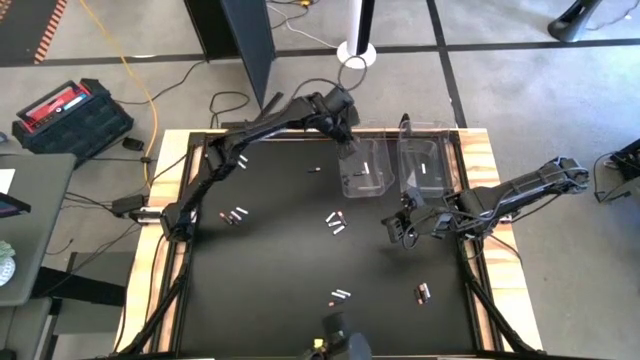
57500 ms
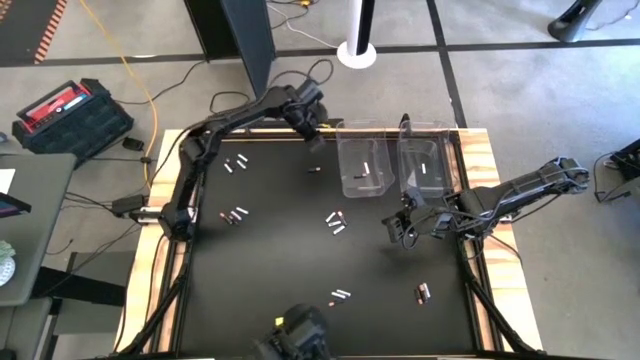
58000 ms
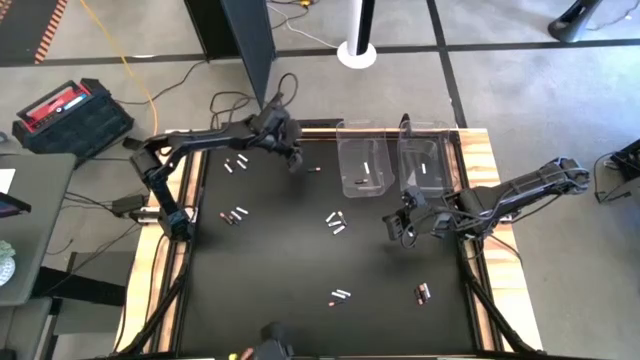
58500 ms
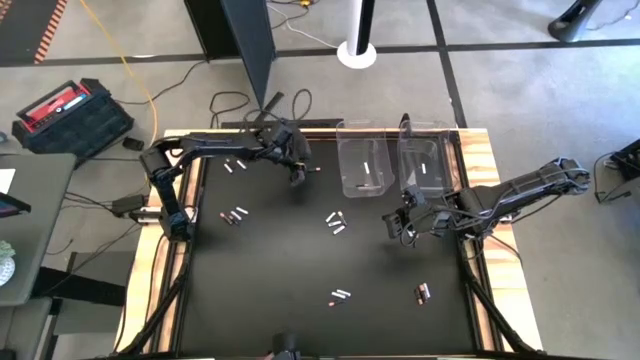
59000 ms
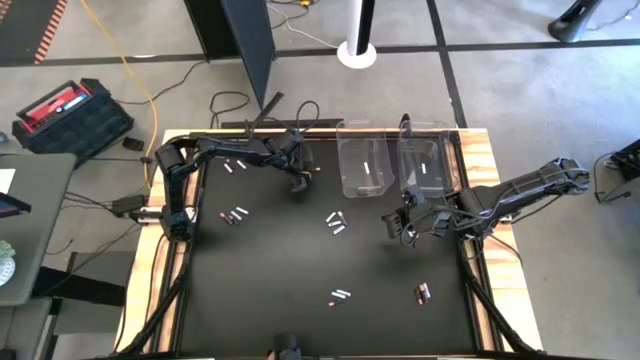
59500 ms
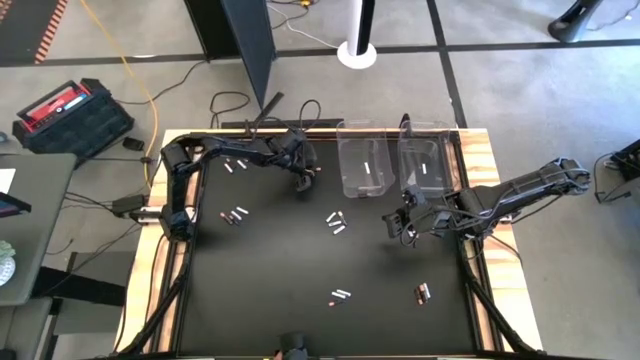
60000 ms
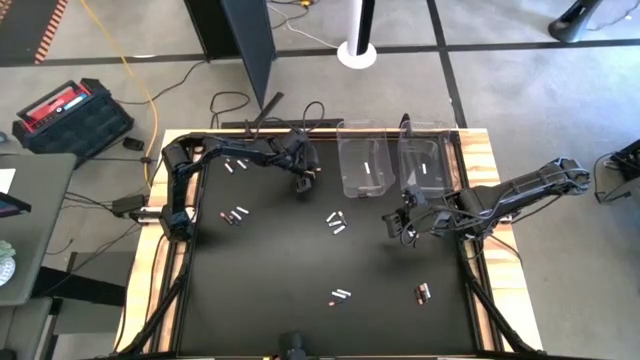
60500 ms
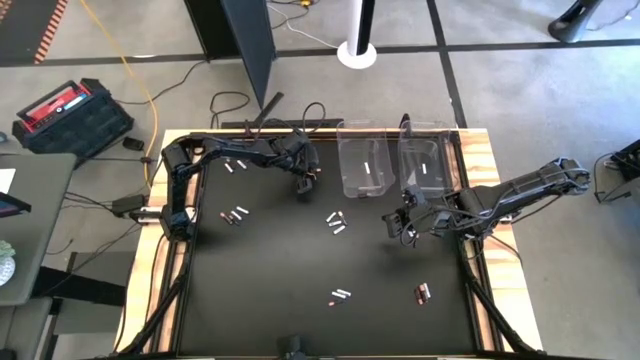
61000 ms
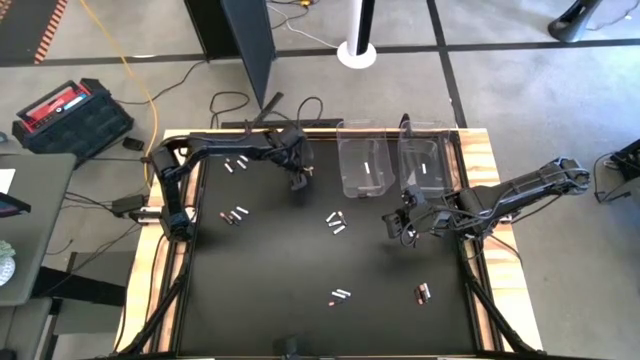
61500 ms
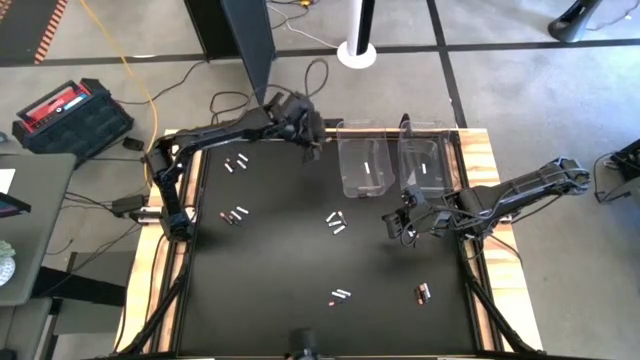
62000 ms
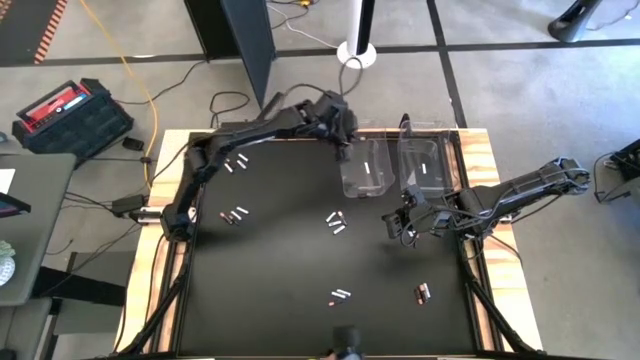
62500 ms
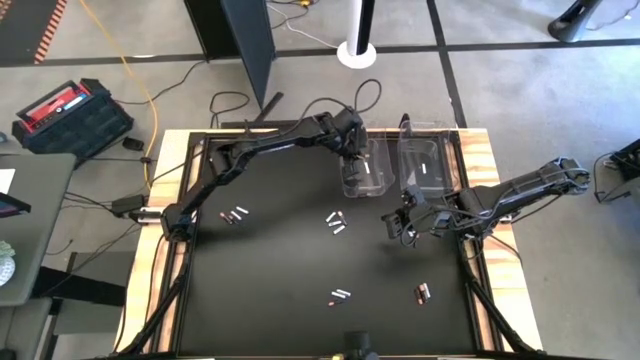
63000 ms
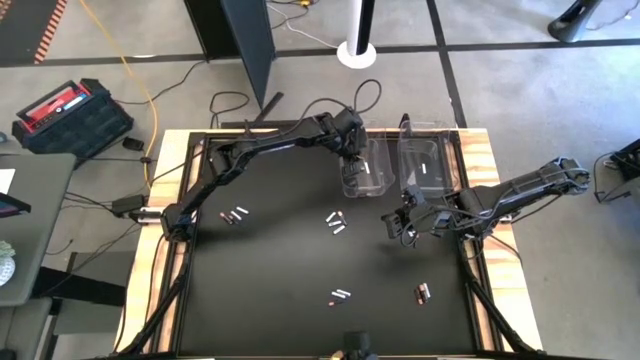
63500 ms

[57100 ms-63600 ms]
Task: Sort batteries
Put the black battery into the left transparent bin

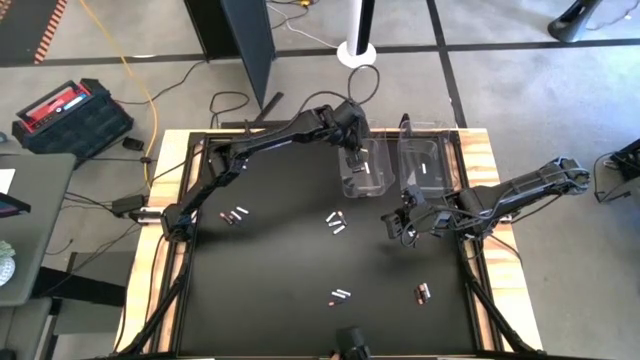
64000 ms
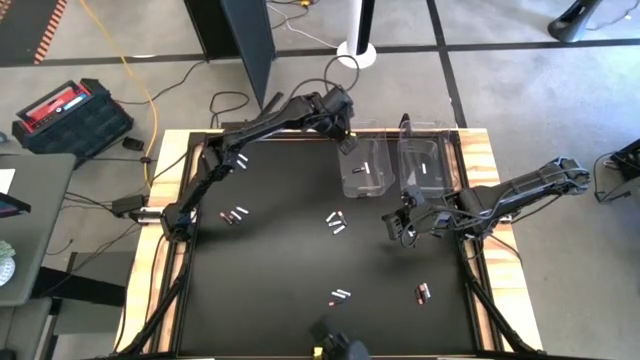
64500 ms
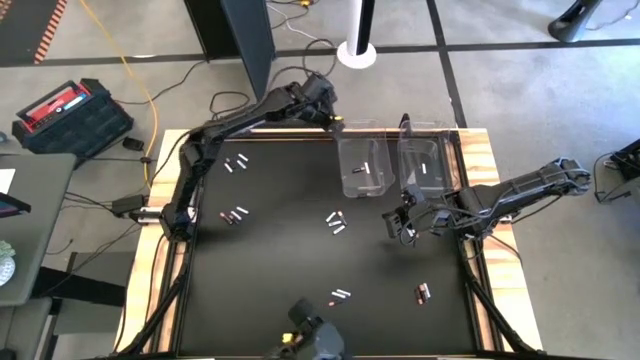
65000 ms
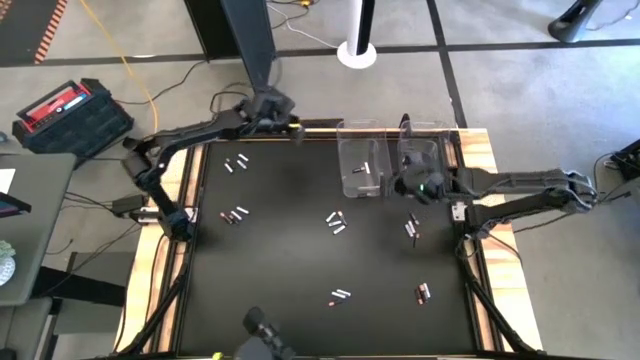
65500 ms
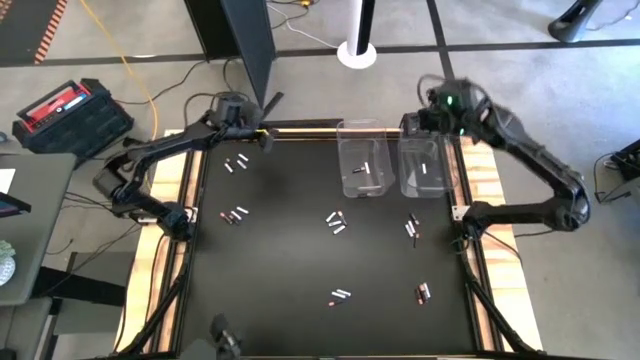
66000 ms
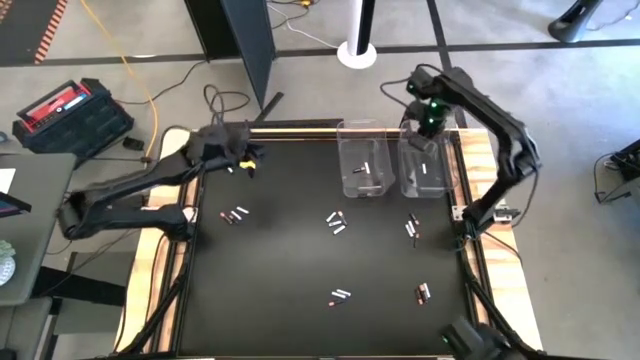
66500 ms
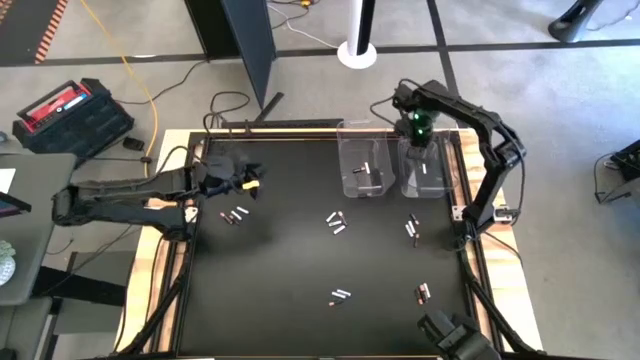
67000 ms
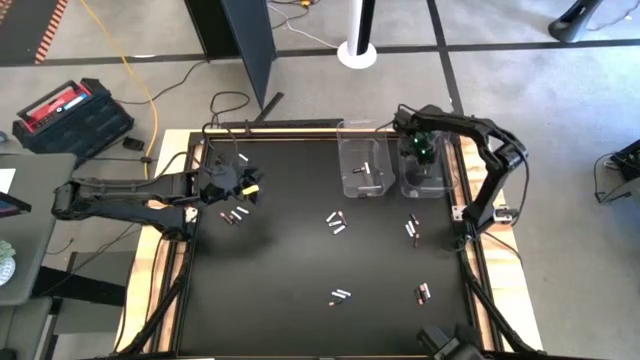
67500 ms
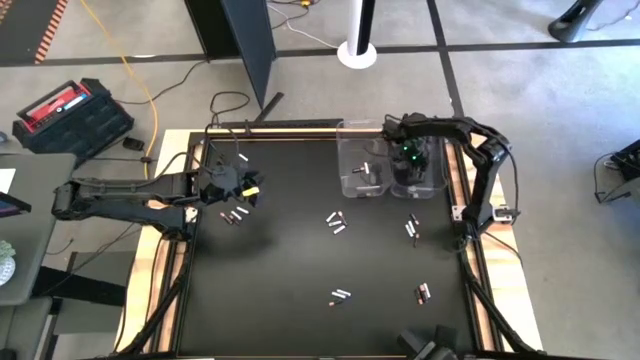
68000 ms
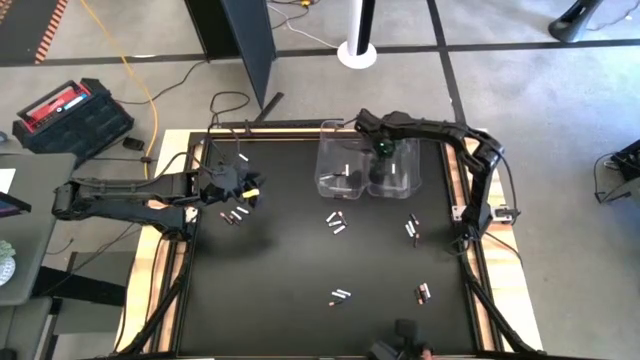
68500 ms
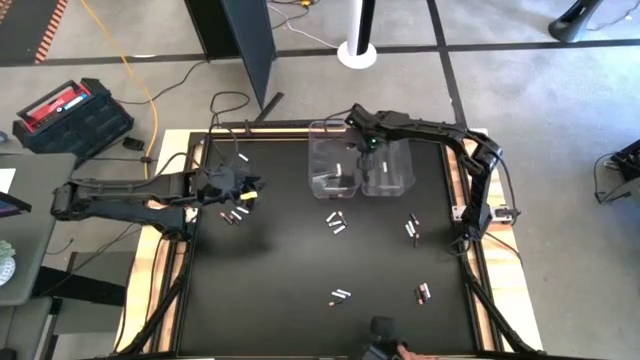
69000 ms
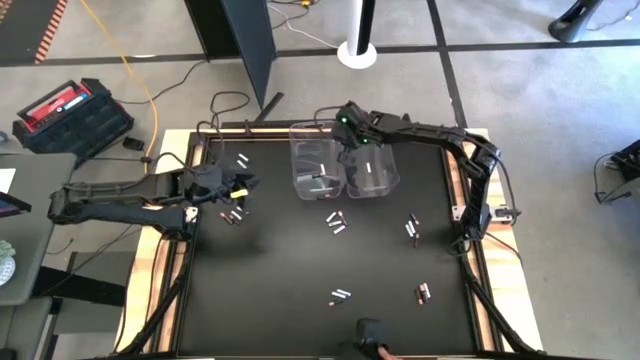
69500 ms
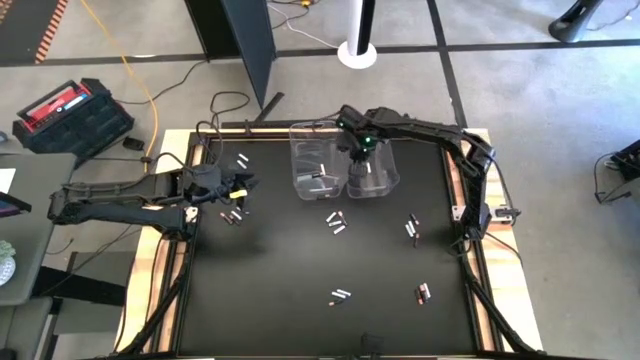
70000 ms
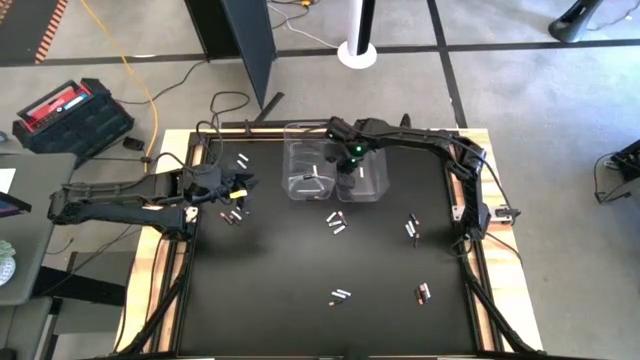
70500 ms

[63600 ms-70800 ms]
Move the transparent bins to the top center of the table

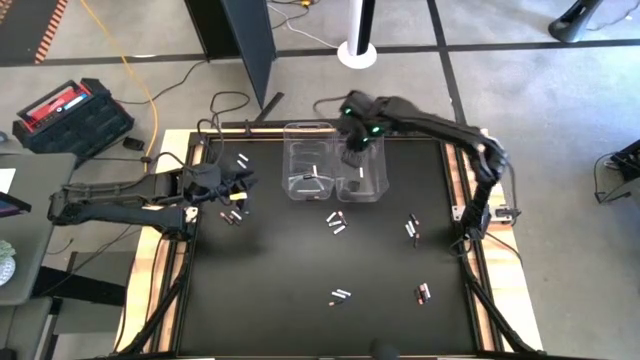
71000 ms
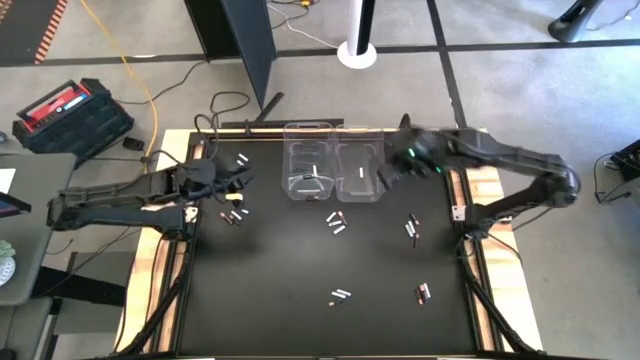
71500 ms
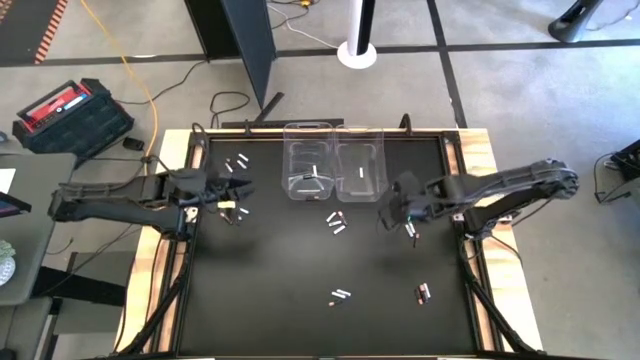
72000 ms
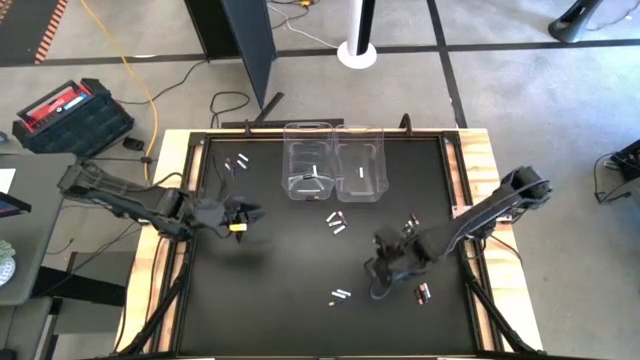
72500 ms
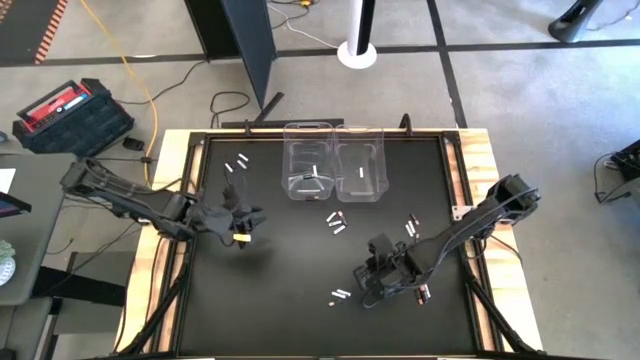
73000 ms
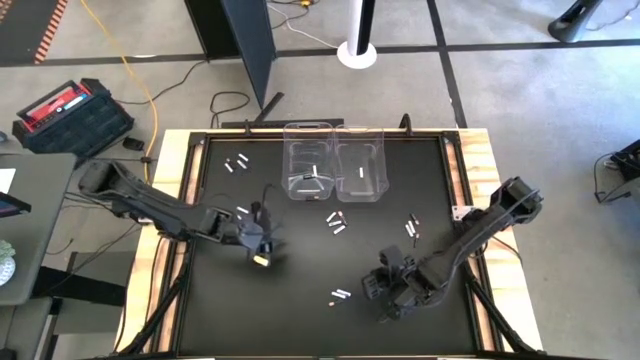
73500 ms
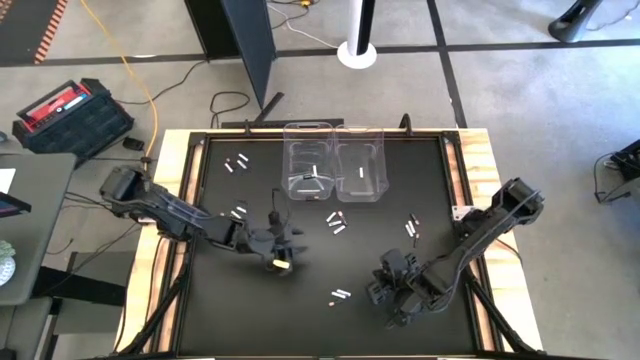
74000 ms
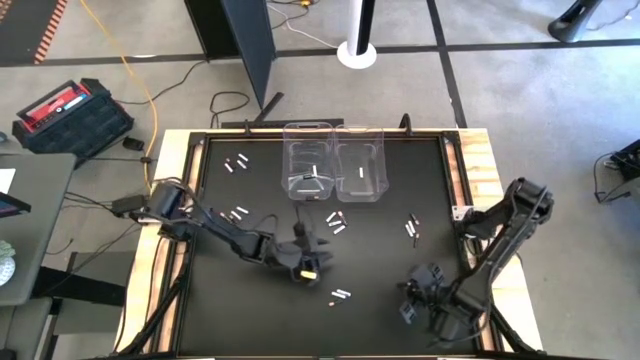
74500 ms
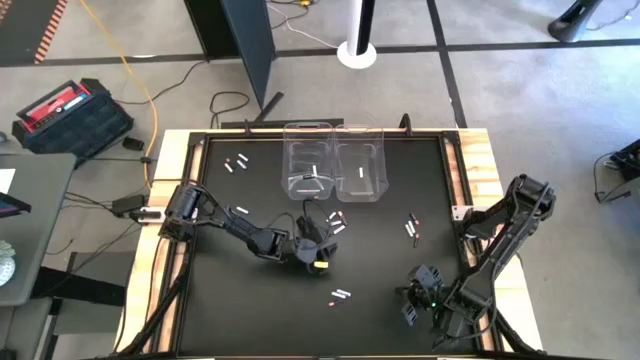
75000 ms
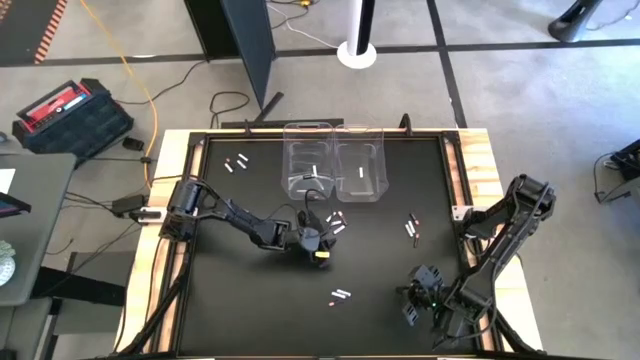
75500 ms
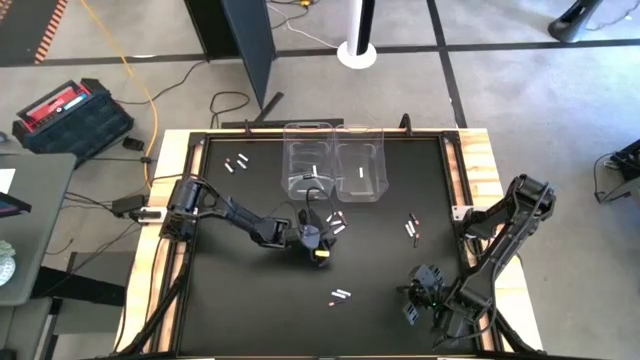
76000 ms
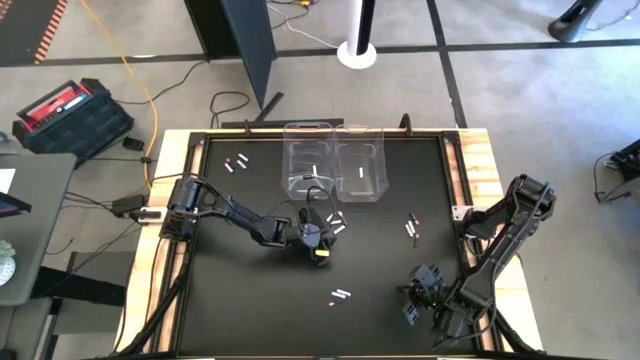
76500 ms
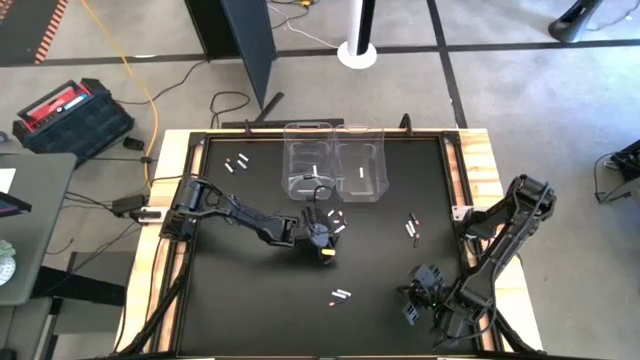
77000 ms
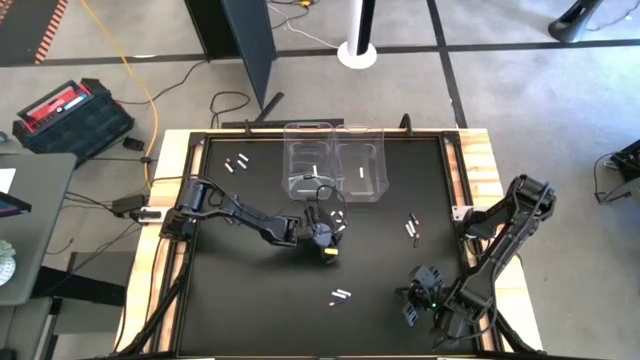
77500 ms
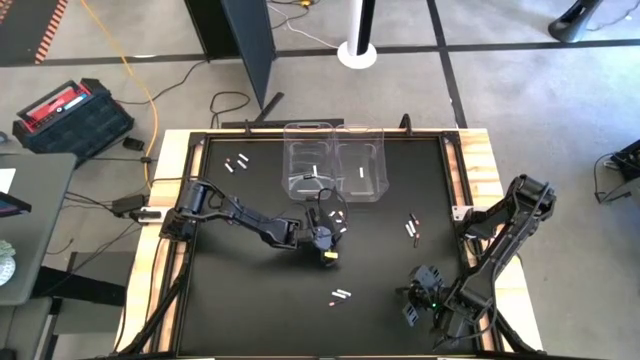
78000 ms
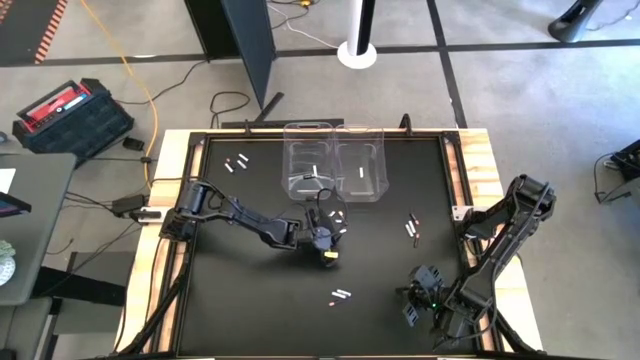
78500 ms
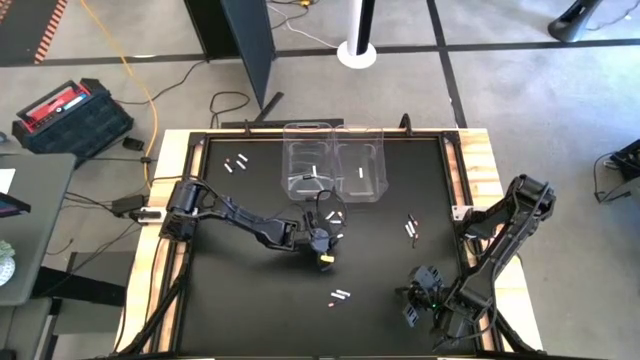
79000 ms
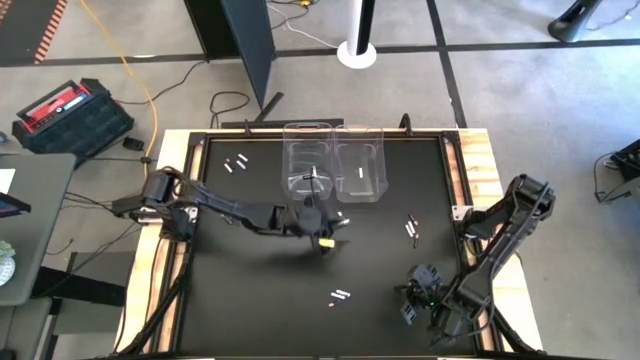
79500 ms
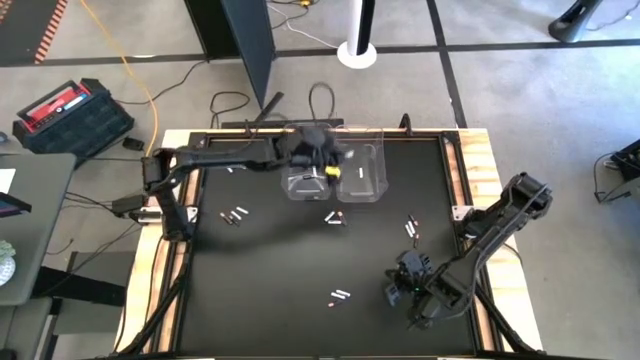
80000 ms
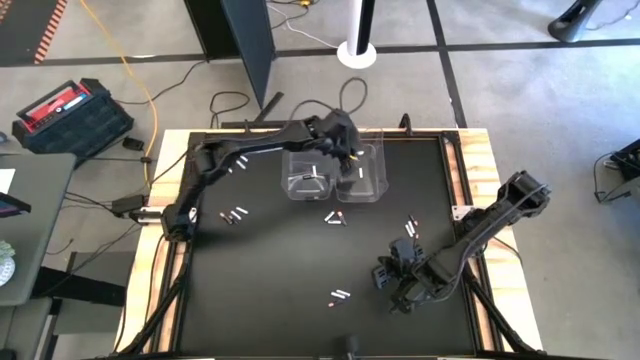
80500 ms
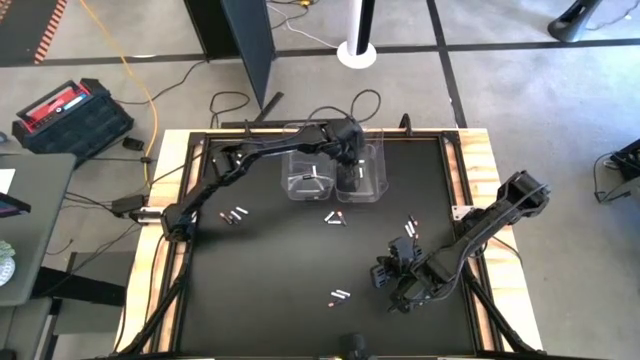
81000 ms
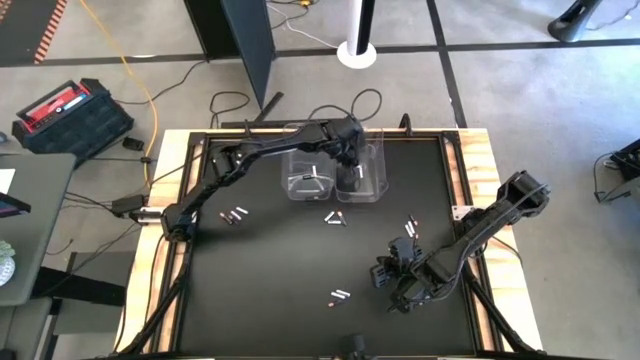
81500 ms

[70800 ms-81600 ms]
Put the white battery into the right transparent bin
